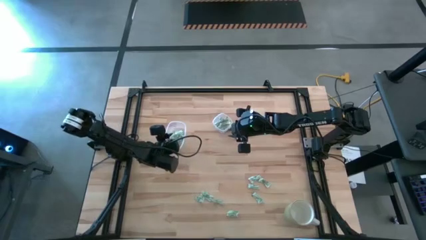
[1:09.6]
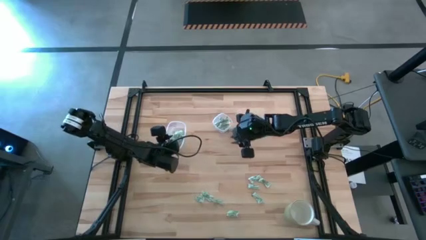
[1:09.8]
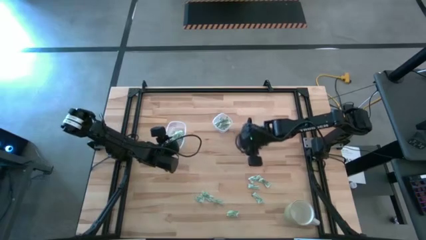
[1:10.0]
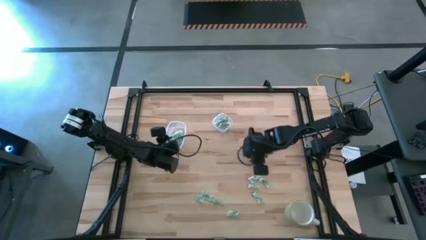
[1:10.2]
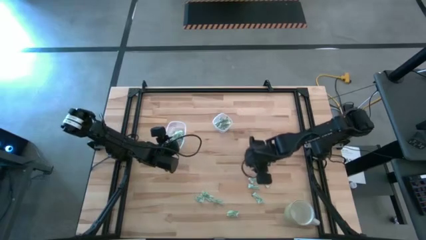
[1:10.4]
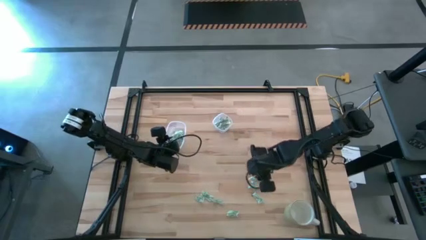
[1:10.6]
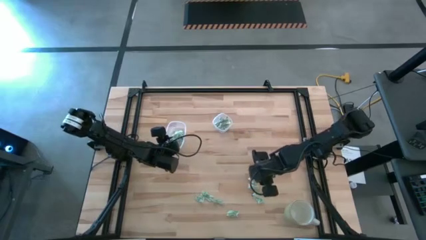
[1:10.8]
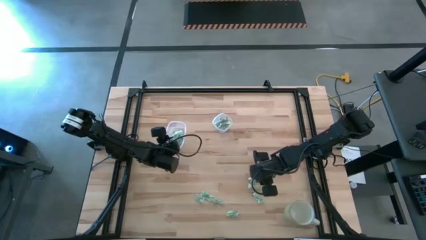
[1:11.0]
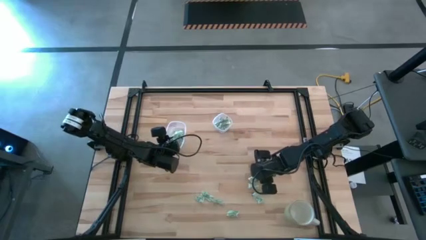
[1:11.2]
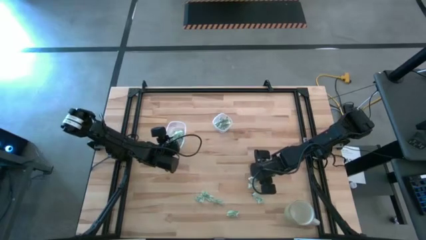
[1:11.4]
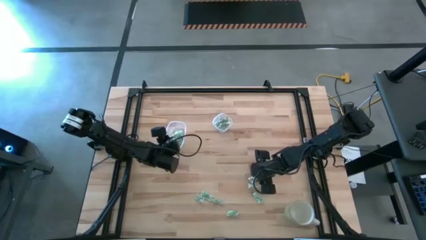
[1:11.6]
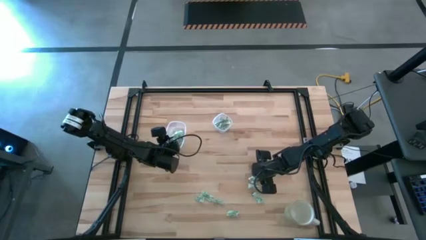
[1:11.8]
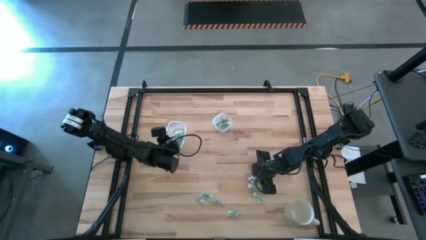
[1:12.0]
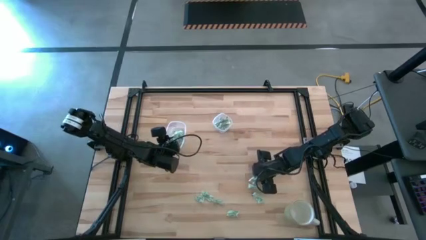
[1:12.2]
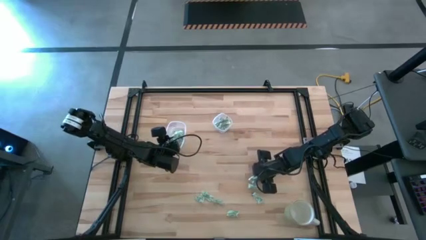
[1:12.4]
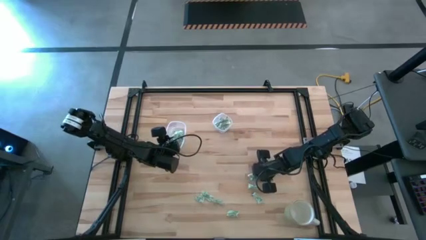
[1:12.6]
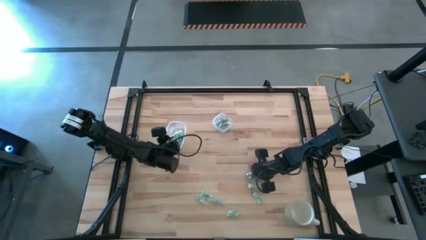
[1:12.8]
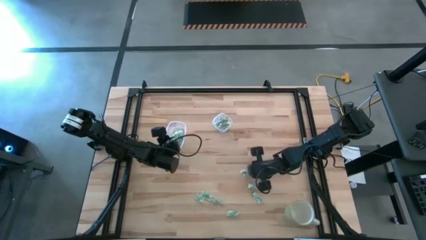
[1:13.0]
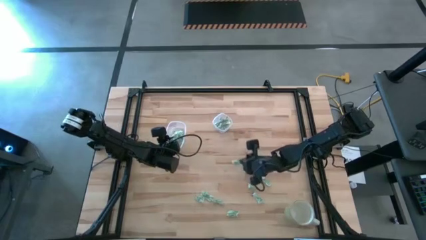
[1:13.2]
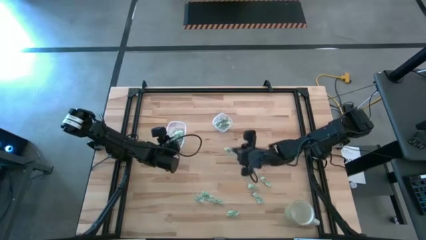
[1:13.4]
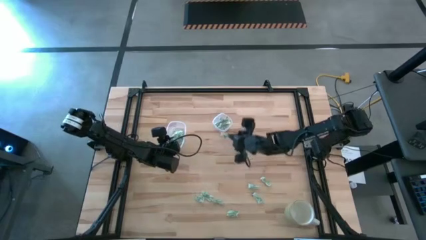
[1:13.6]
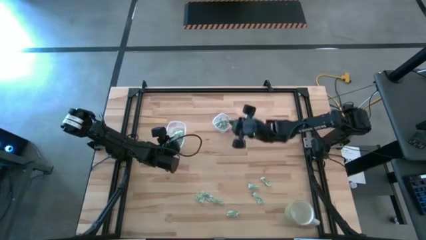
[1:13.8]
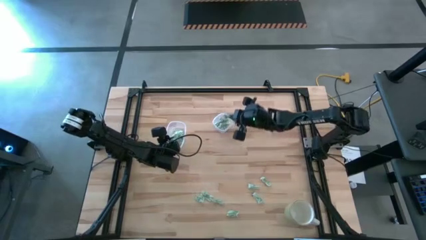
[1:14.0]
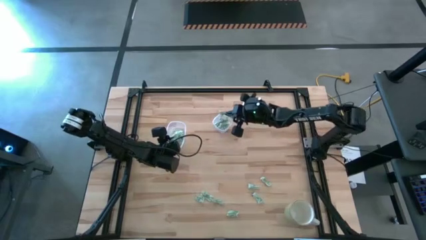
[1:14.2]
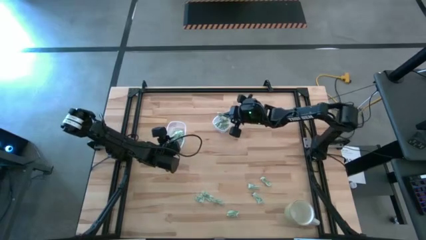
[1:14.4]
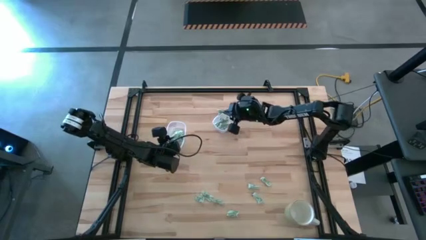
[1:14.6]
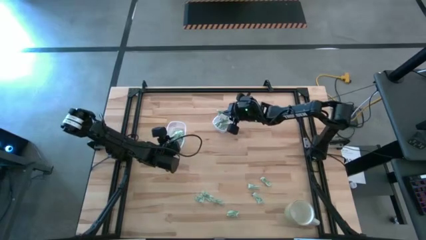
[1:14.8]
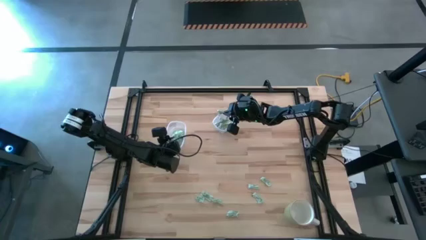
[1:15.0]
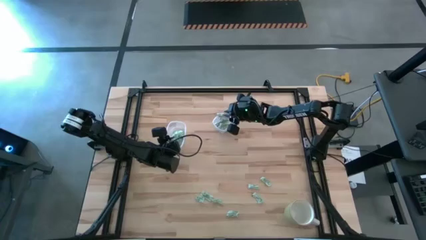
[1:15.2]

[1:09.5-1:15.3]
Task: Pick and place items into bin
Put the stevia packet into the small transparent container

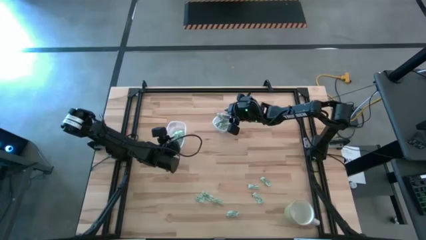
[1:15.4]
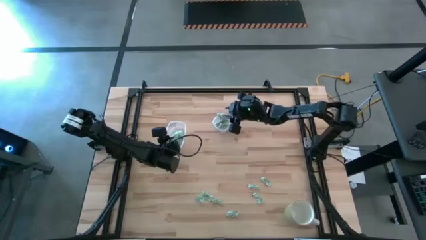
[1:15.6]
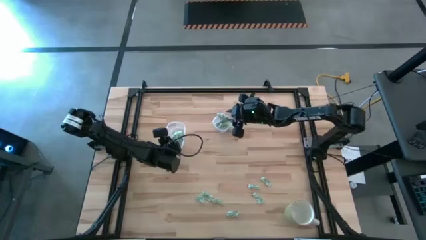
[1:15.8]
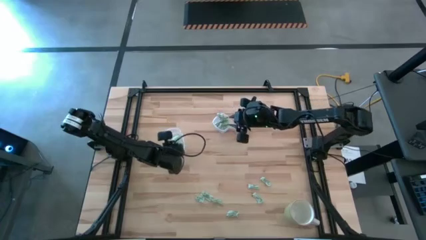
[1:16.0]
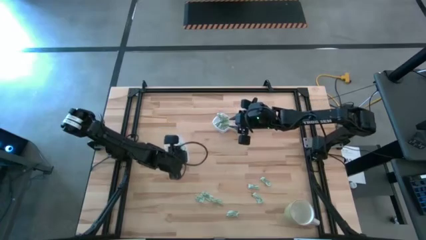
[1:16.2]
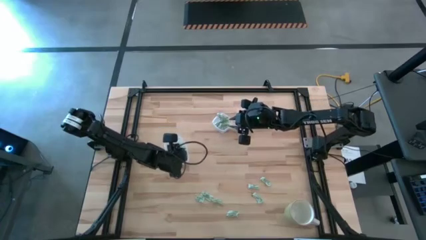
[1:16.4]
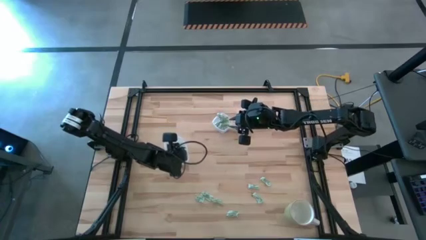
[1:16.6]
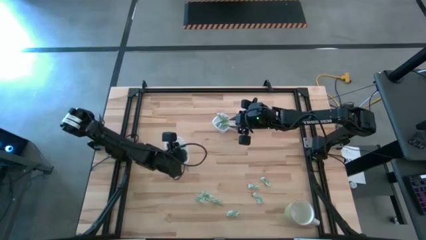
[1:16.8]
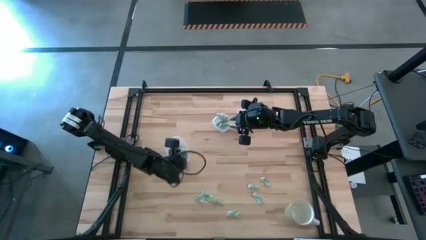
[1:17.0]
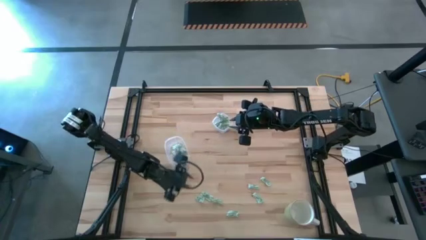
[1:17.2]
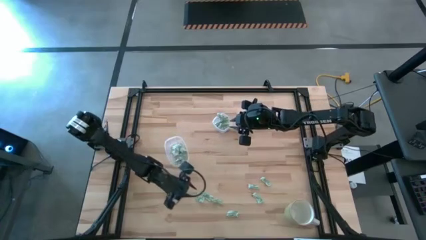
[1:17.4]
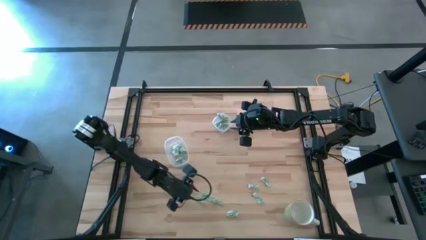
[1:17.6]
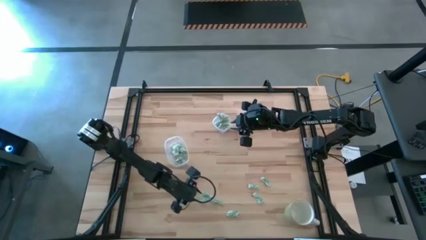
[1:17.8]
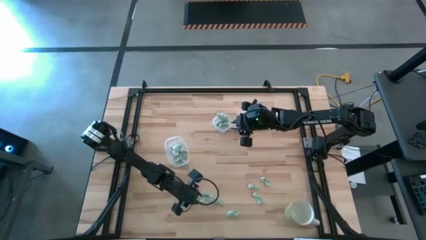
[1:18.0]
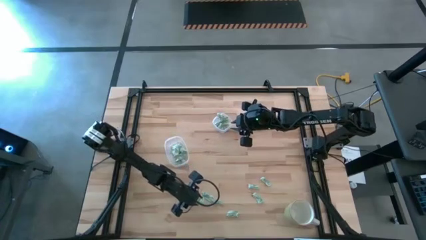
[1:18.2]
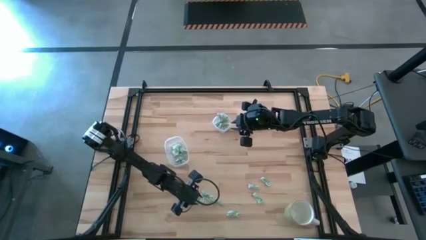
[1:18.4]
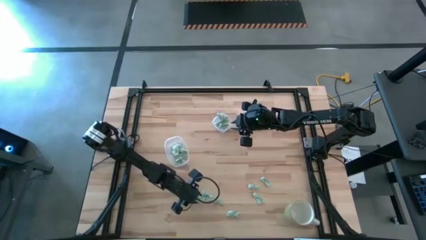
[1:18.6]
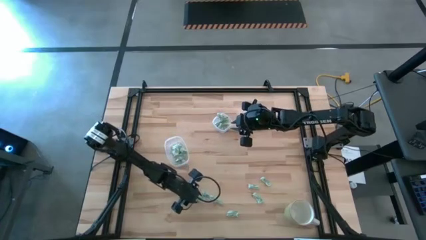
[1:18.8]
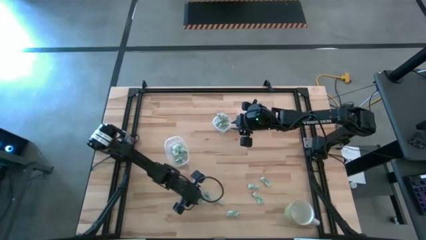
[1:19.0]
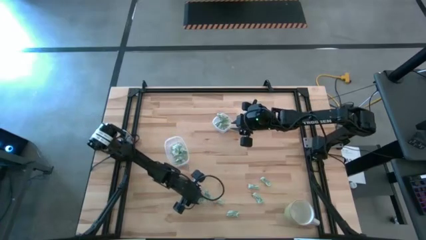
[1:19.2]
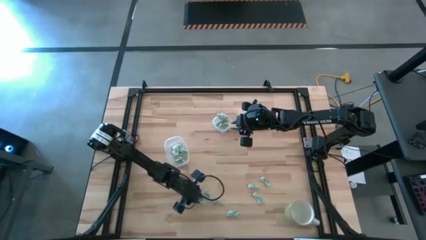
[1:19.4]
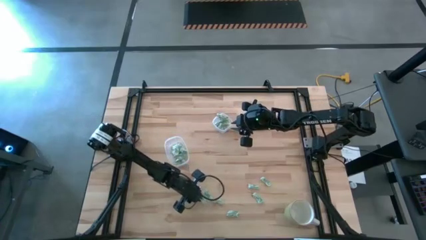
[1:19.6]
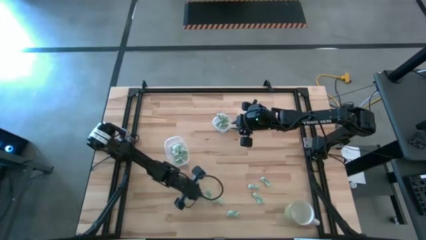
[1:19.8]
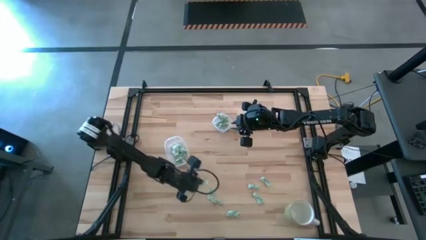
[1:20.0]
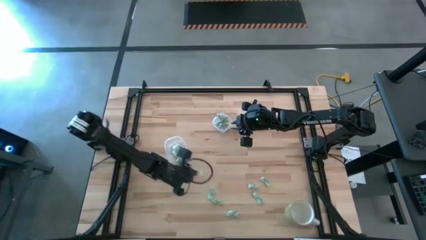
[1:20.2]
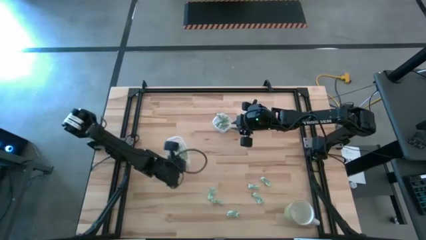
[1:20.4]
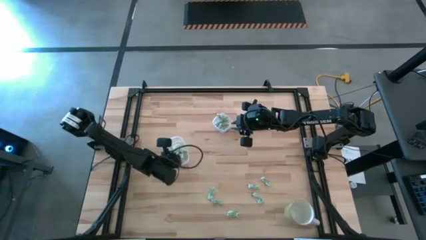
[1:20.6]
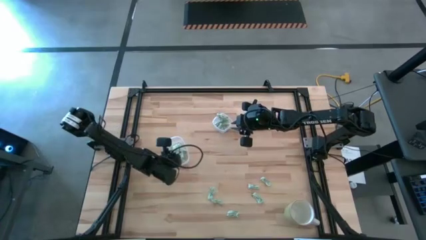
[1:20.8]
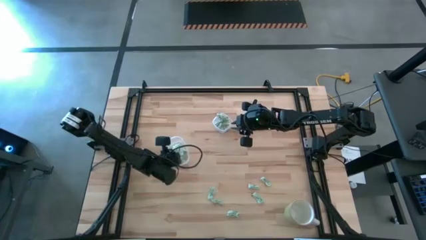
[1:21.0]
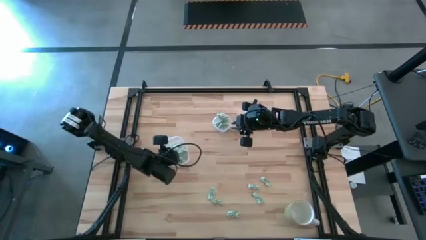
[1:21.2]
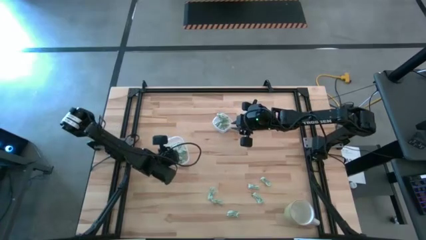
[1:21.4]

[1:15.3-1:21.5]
Put the stevia packet into the large transparent container

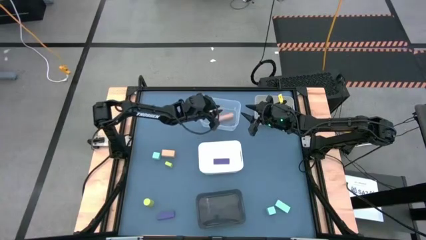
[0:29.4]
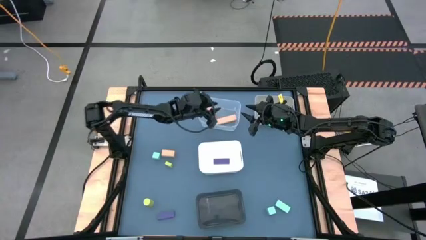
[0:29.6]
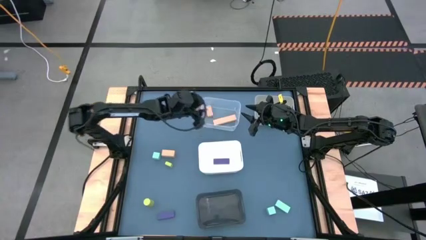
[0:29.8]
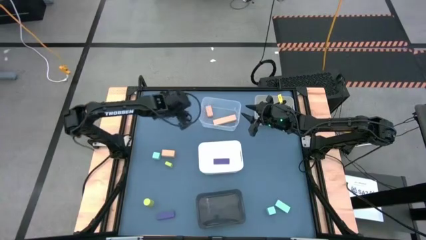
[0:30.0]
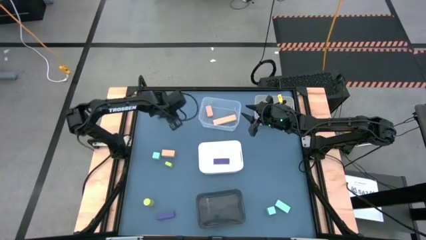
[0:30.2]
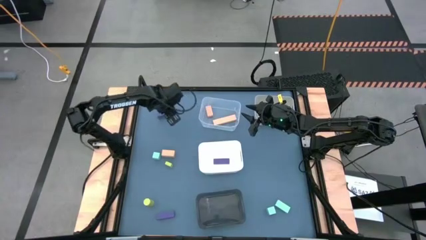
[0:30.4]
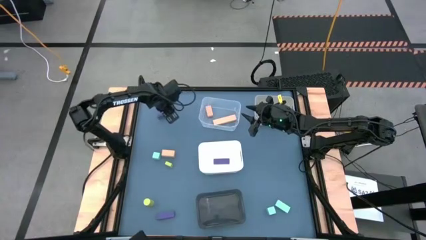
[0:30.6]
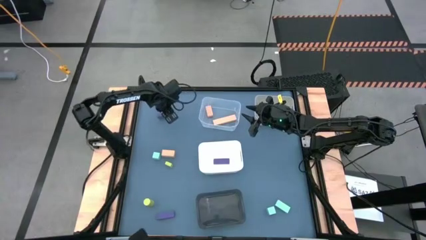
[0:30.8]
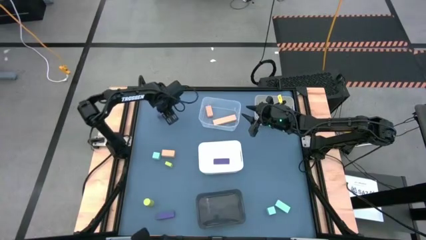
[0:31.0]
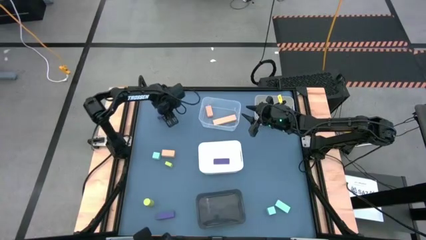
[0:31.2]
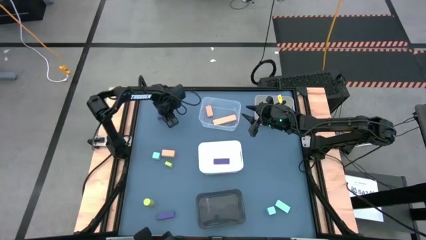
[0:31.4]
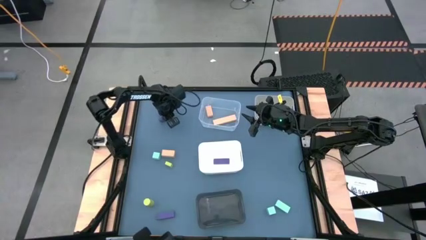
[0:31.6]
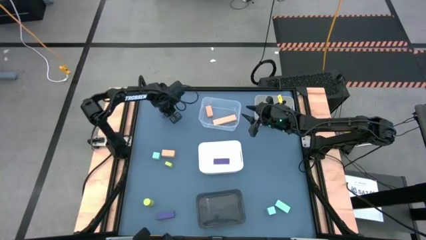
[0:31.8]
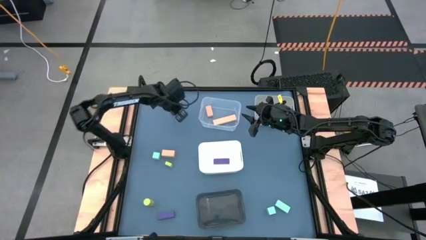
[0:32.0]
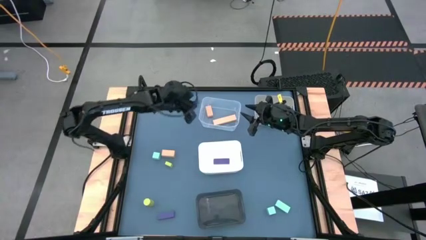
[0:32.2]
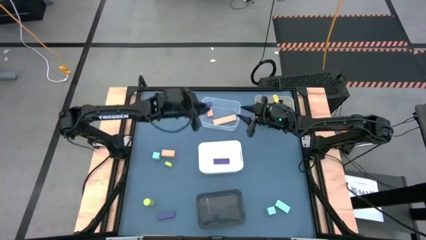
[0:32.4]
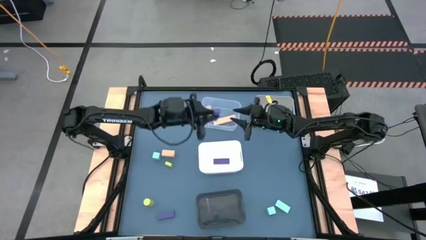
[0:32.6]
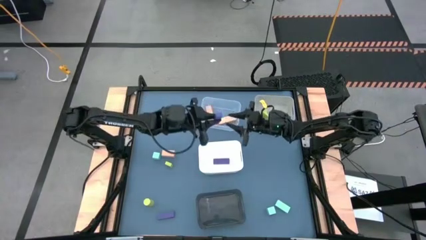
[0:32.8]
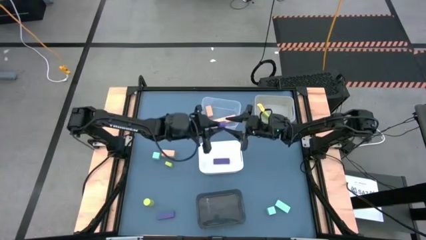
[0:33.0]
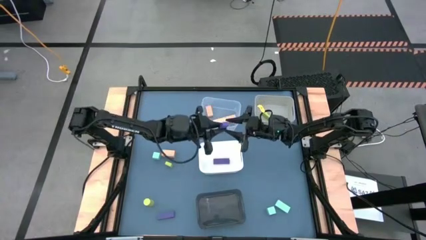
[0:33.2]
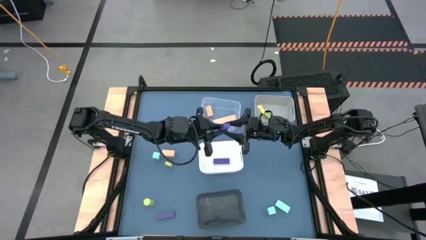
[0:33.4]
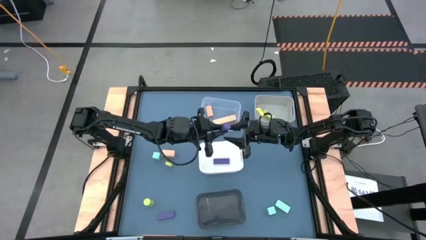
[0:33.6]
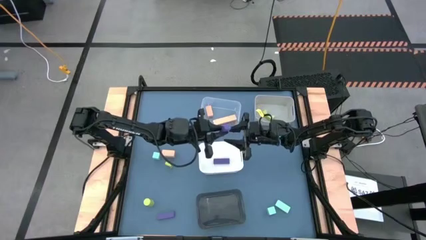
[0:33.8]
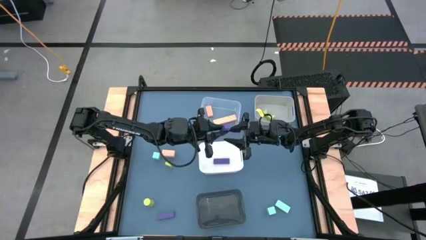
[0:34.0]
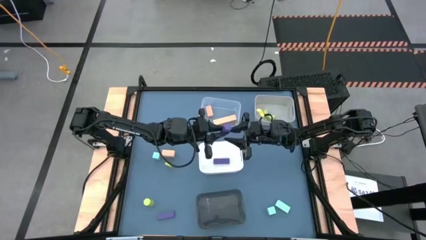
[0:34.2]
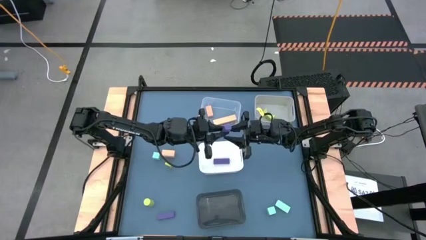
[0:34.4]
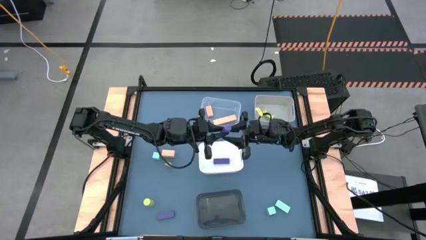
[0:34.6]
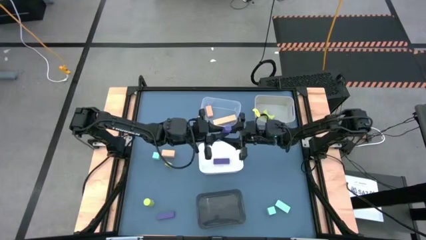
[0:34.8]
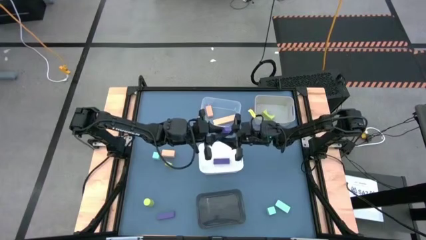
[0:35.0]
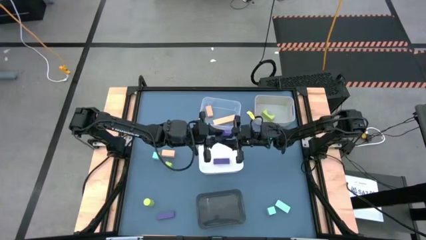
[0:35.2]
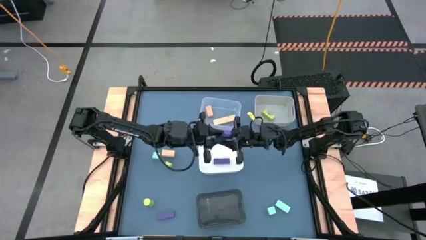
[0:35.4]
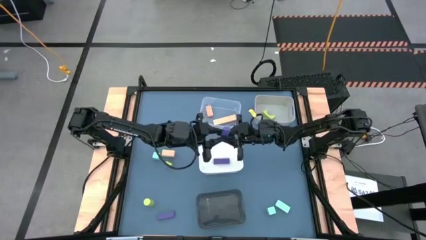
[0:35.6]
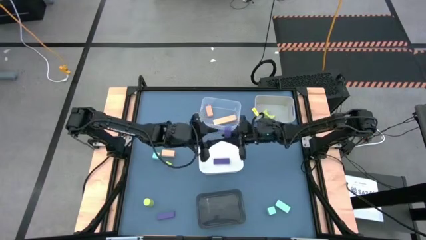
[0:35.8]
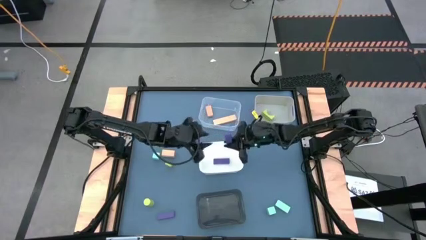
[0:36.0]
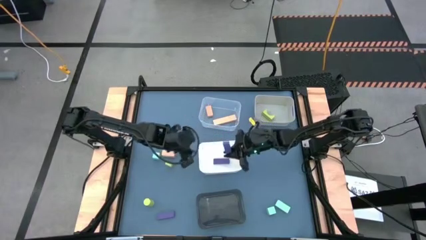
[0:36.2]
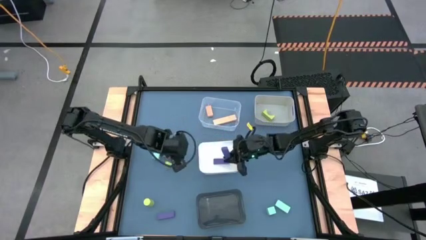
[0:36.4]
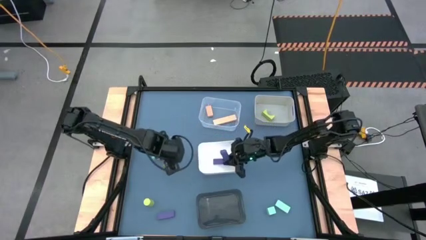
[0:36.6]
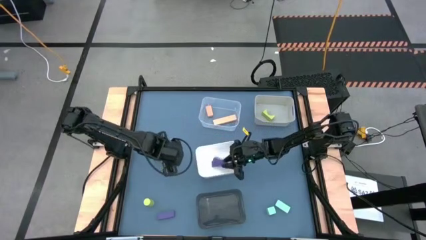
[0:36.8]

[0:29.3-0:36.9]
Task: Sort & place blocks by color
Put the top purple rectangle block into the white bin
